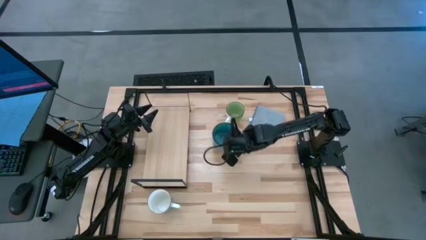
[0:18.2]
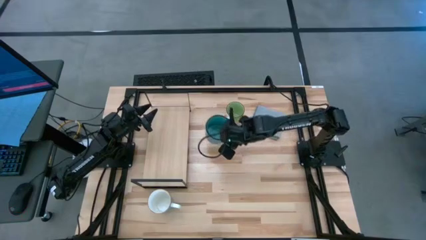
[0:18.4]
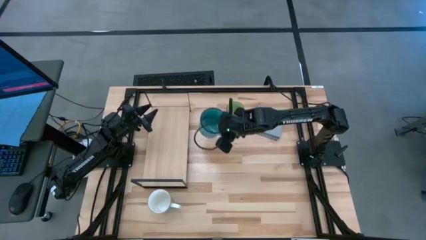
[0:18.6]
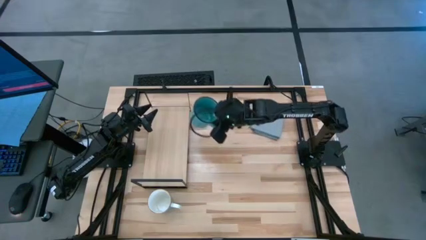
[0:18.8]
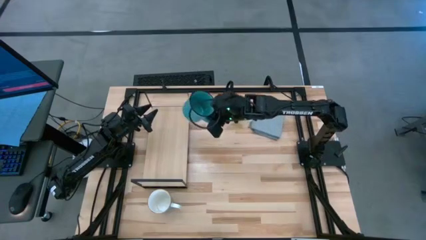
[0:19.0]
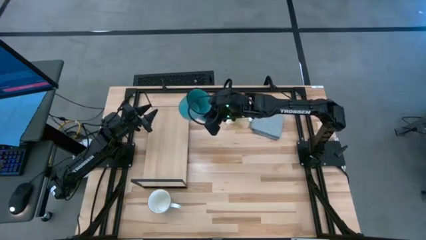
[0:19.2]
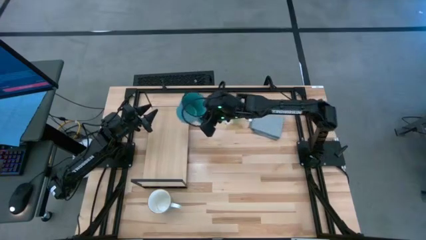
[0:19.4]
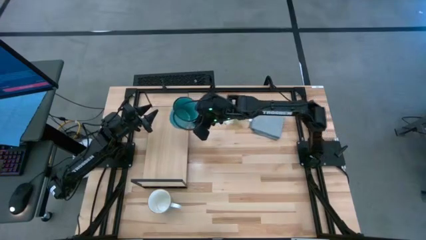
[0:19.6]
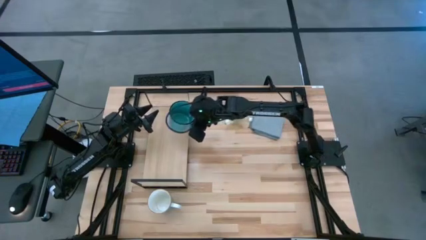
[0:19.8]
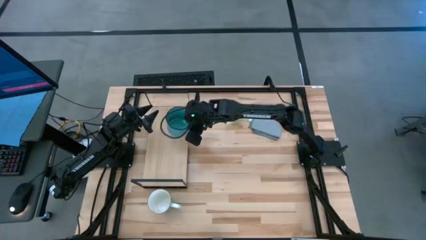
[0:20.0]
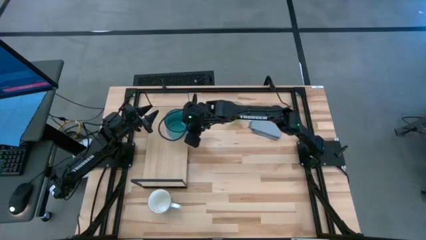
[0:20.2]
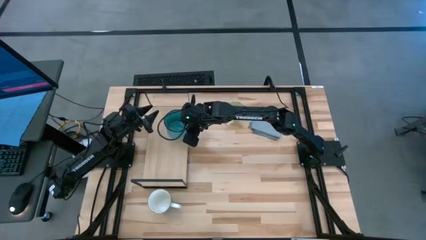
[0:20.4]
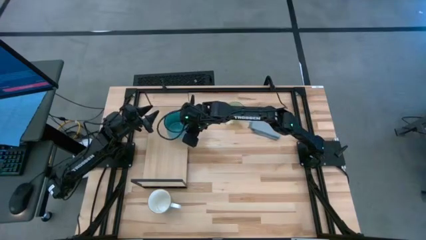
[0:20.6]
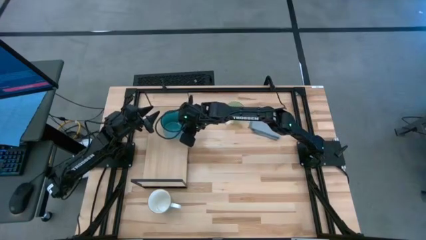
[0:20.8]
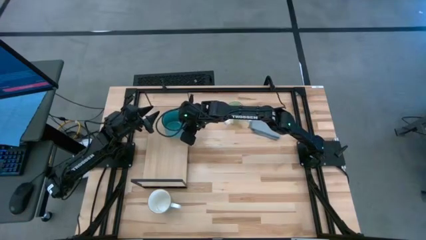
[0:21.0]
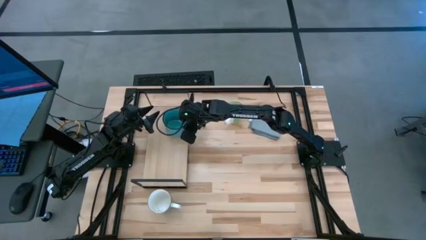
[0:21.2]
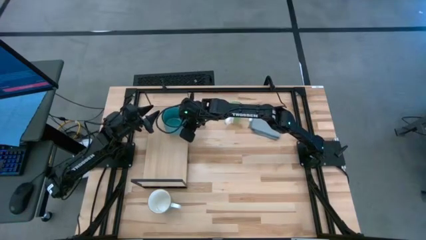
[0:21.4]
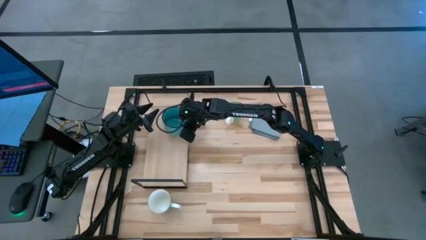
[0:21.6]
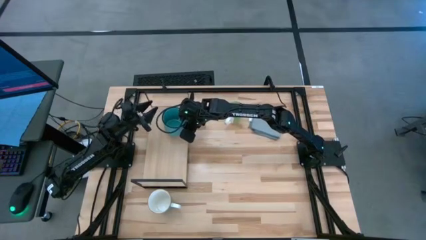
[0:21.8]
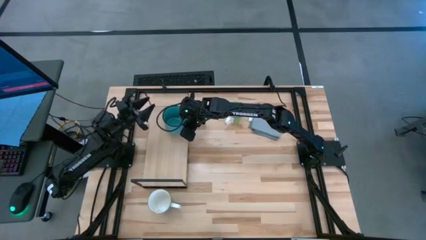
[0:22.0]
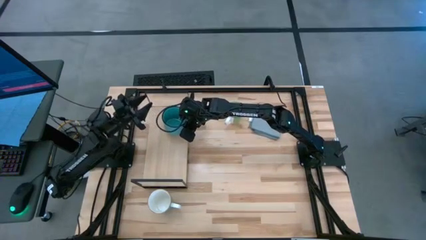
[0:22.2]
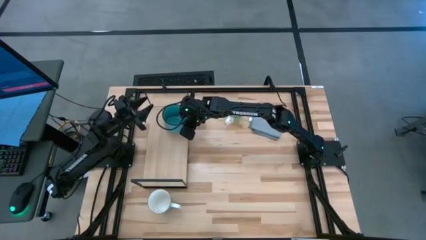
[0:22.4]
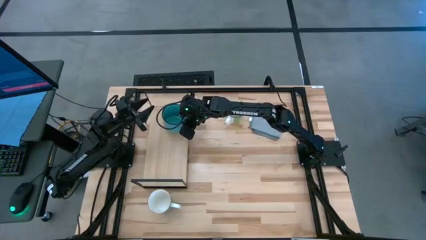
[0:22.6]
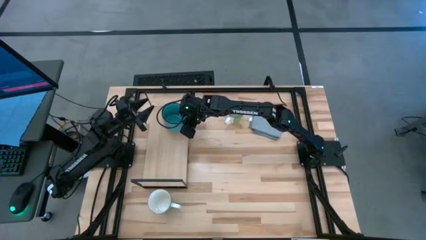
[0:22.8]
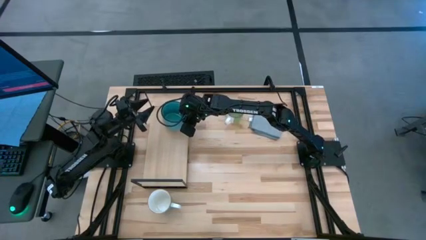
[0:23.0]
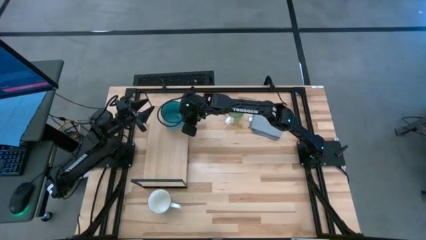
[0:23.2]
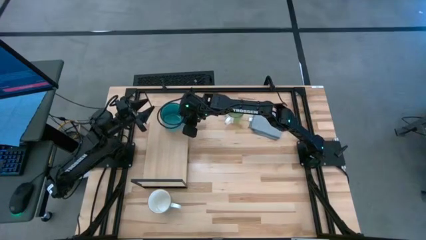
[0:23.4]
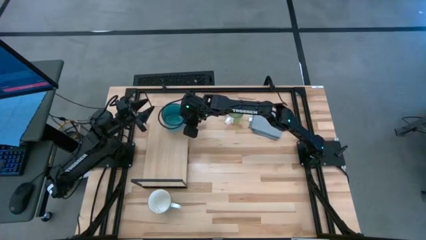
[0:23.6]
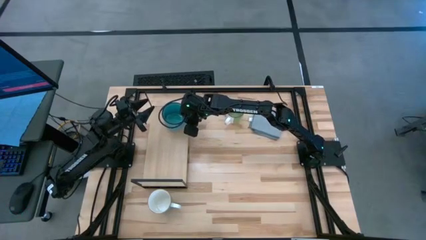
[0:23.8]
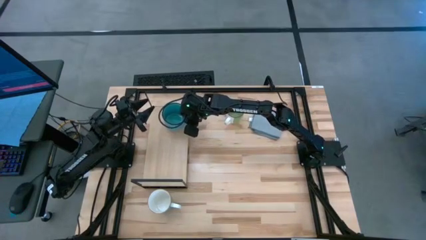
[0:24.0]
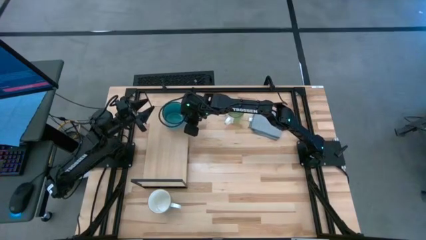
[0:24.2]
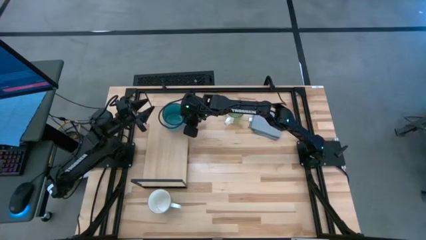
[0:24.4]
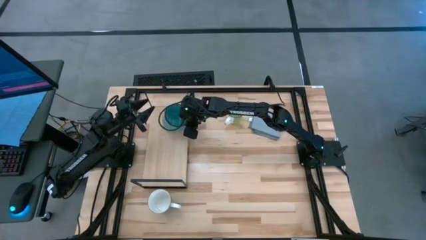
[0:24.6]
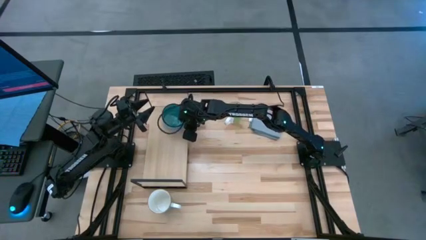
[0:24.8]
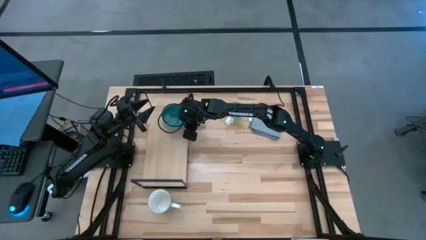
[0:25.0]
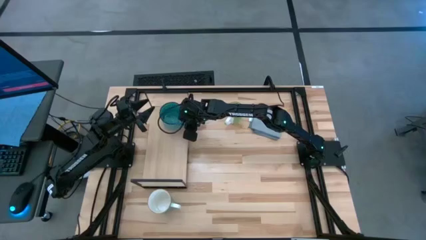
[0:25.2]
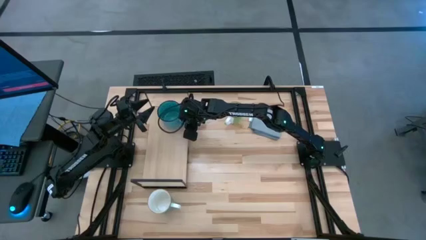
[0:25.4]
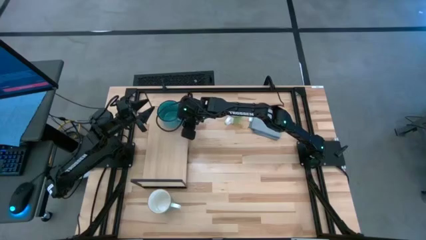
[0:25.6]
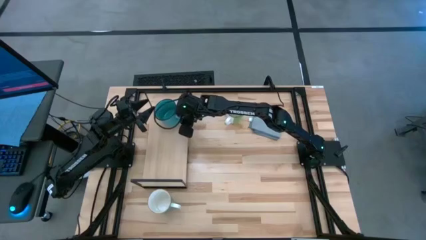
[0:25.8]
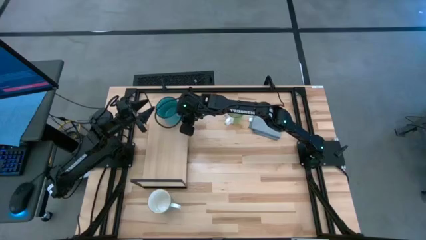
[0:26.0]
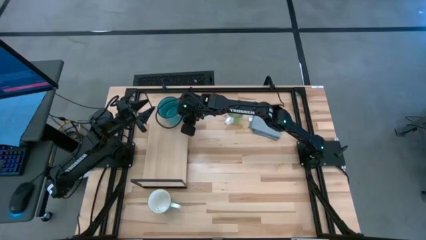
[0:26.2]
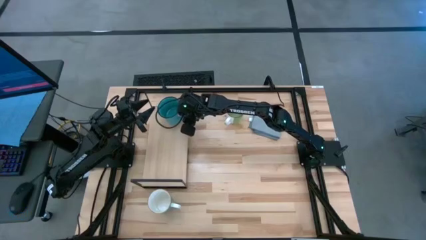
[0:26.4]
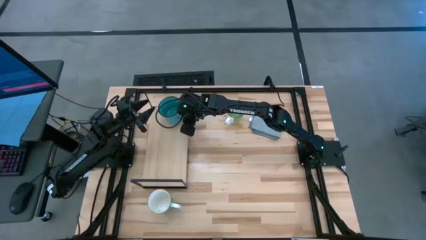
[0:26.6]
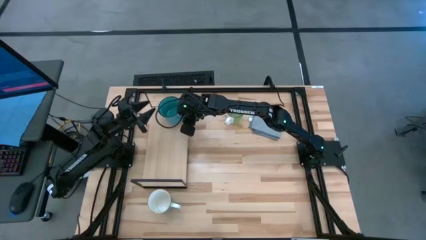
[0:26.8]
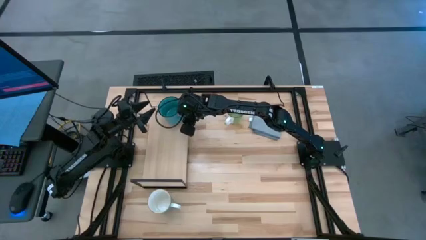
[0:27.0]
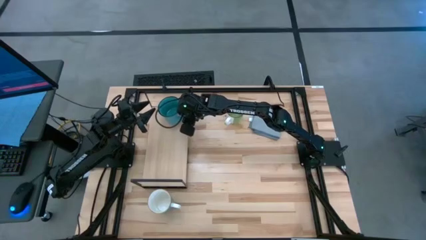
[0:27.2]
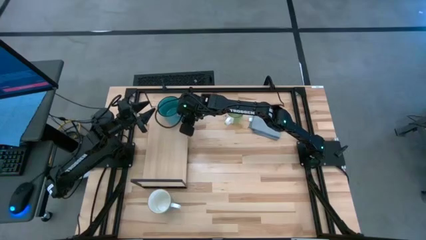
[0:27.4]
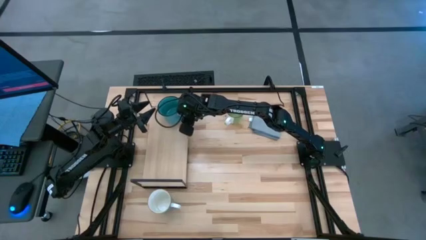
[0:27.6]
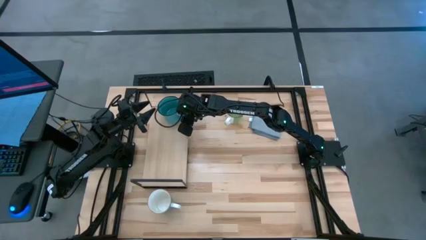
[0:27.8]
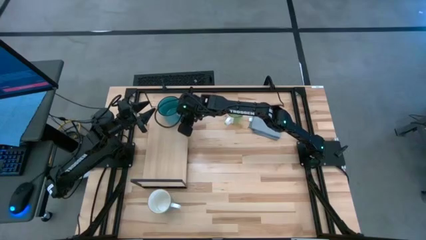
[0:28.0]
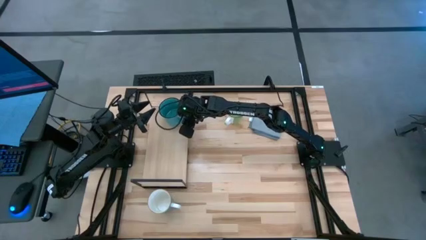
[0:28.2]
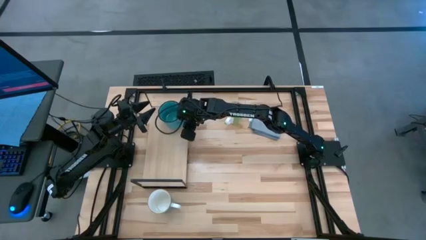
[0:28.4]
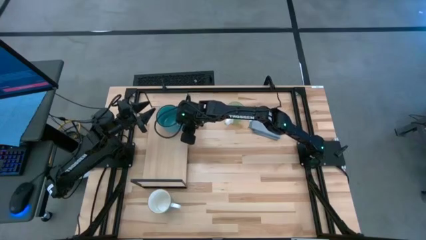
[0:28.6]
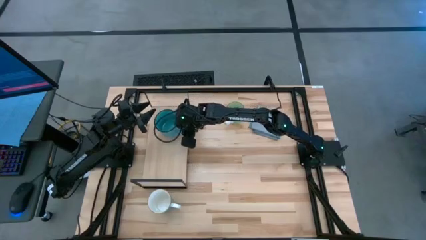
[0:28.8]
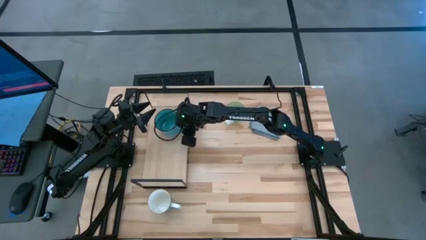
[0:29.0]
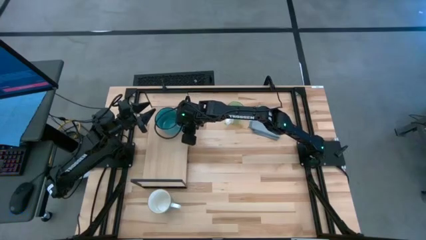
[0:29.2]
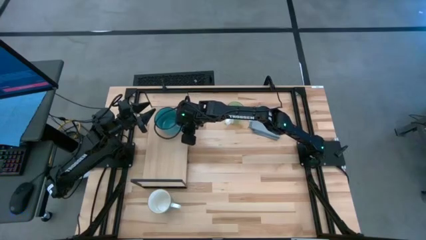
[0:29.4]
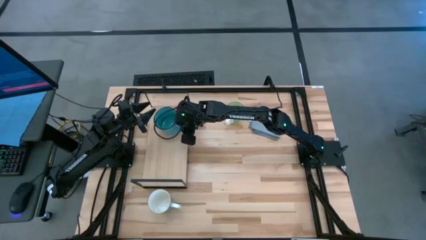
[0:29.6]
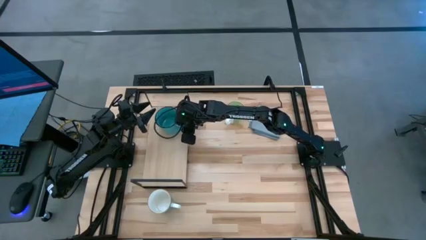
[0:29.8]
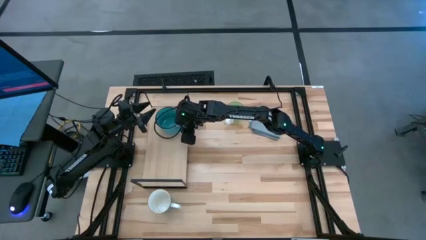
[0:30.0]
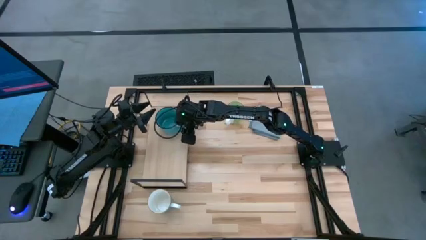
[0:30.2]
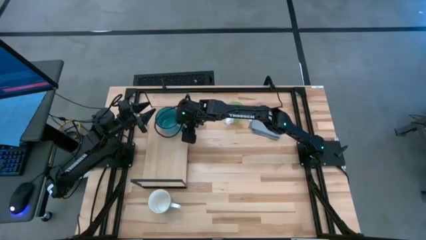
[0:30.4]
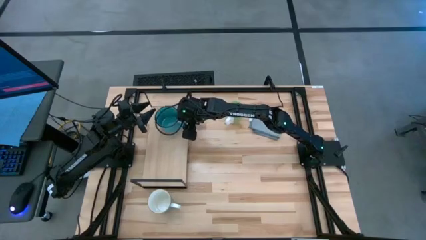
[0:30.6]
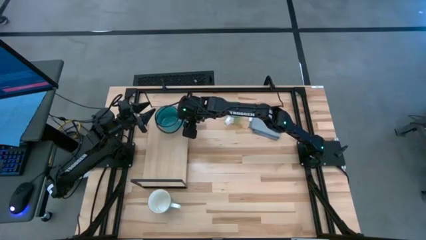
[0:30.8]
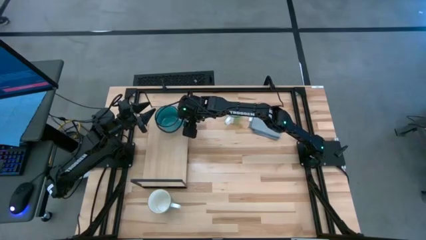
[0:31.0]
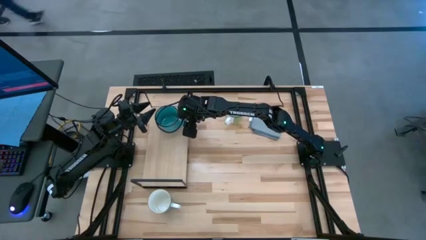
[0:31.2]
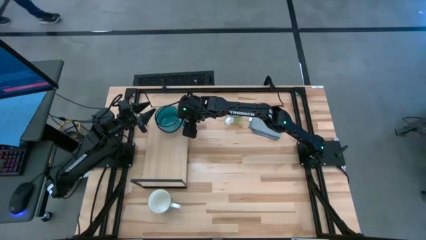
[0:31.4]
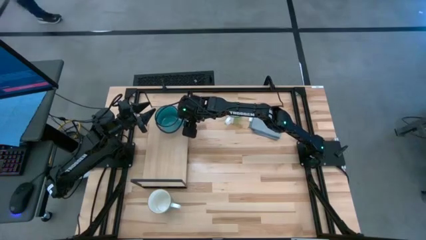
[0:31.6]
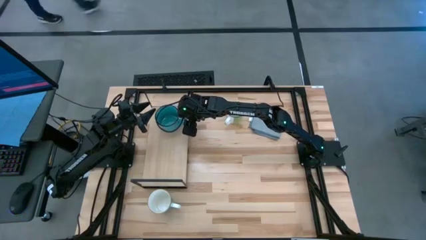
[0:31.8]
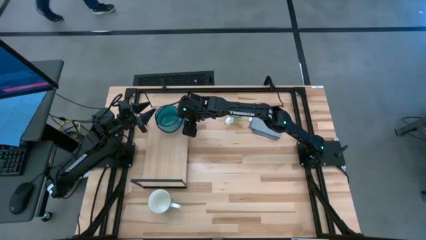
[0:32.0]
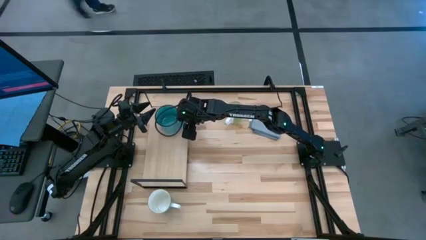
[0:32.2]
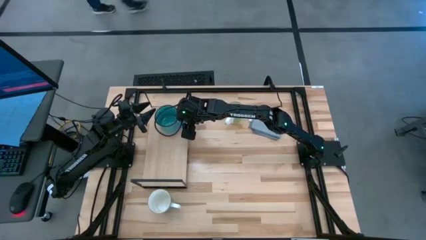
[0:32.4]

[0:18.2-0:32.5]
Task: Stack small to large cups/mugs on shelf
Put the blue mug on the shelf
